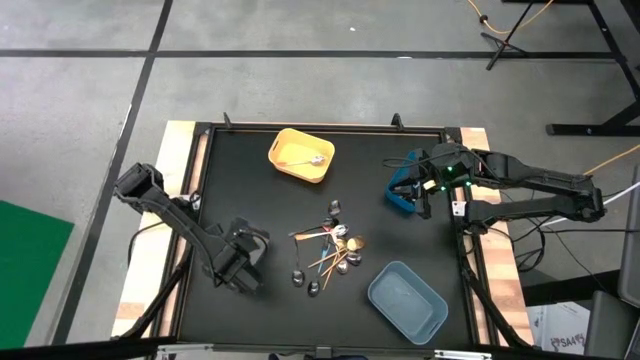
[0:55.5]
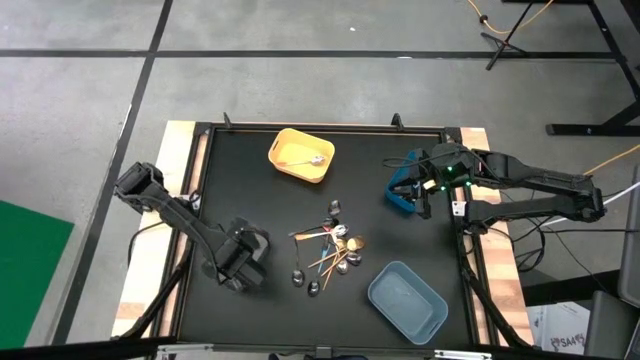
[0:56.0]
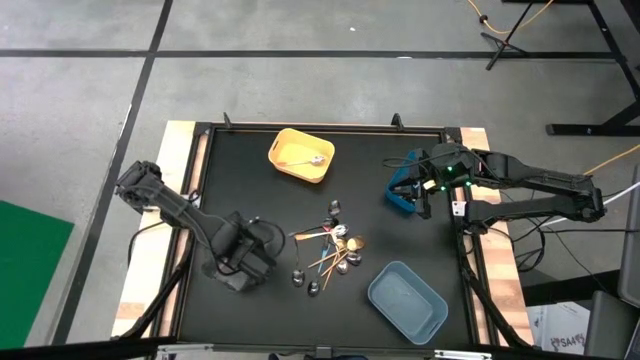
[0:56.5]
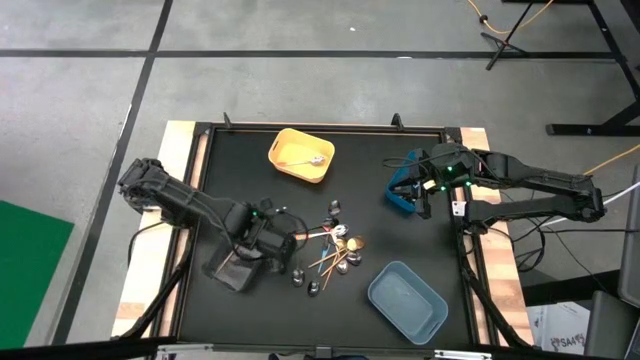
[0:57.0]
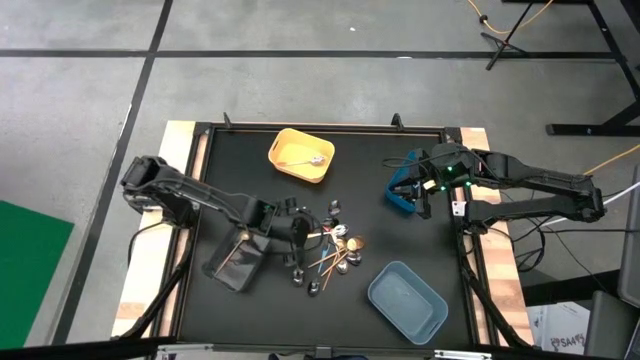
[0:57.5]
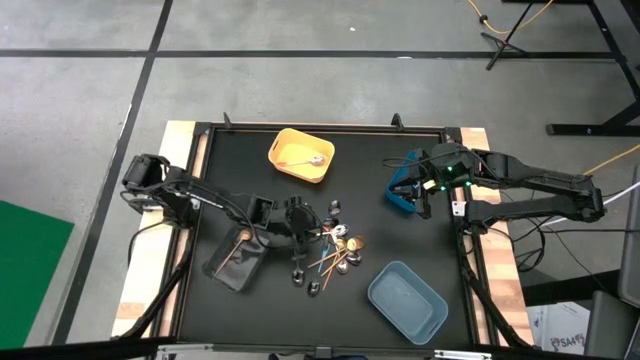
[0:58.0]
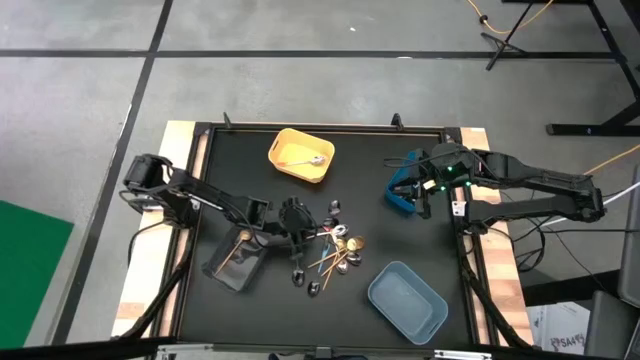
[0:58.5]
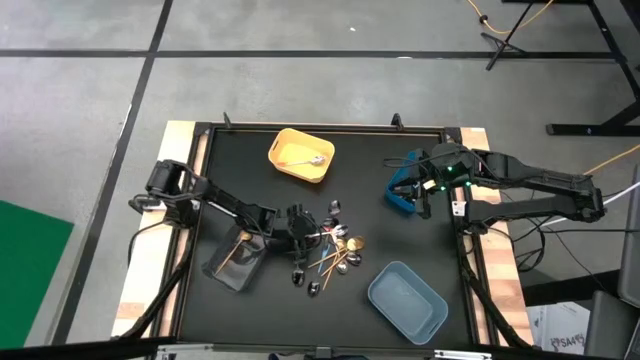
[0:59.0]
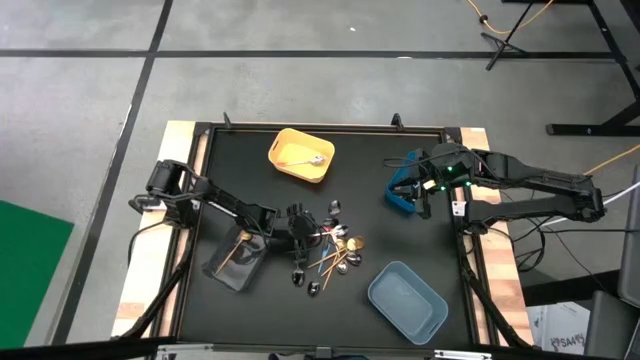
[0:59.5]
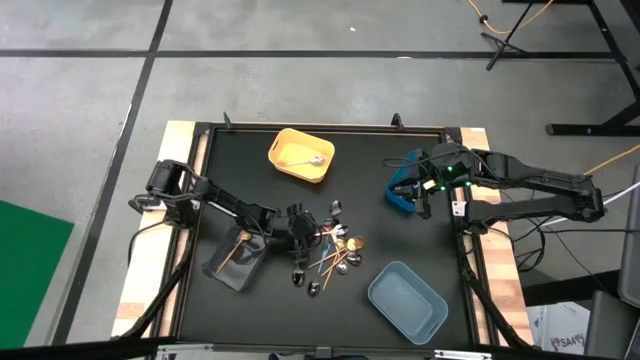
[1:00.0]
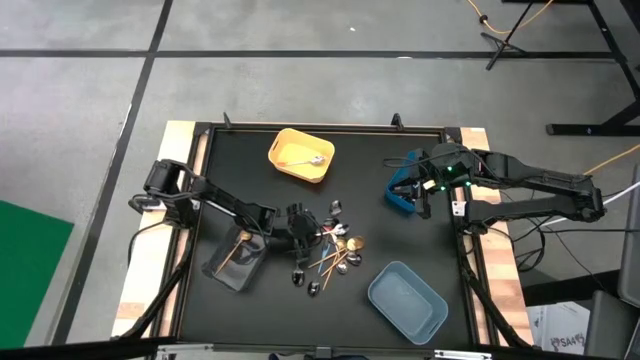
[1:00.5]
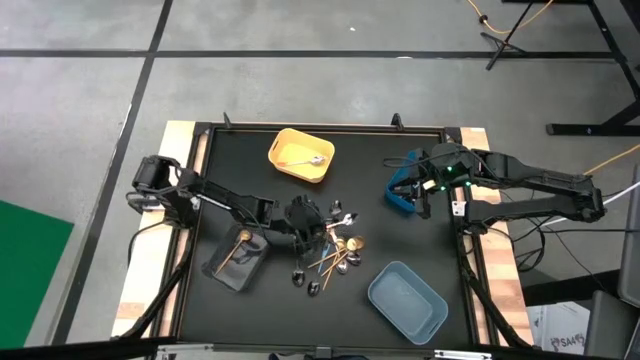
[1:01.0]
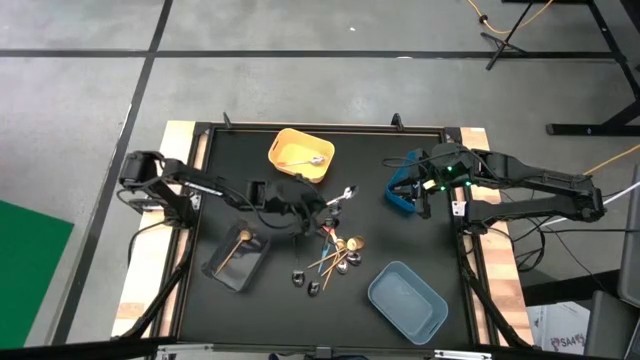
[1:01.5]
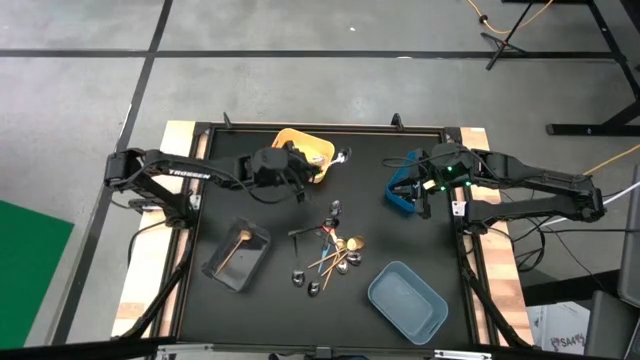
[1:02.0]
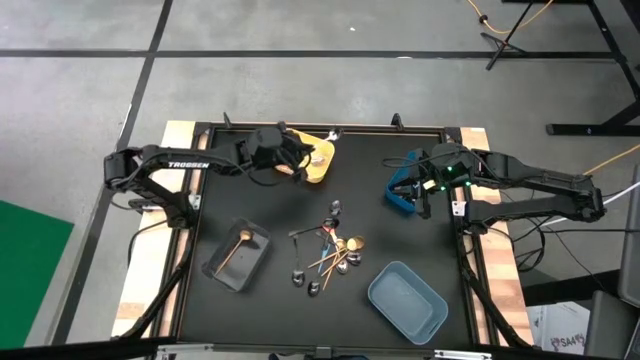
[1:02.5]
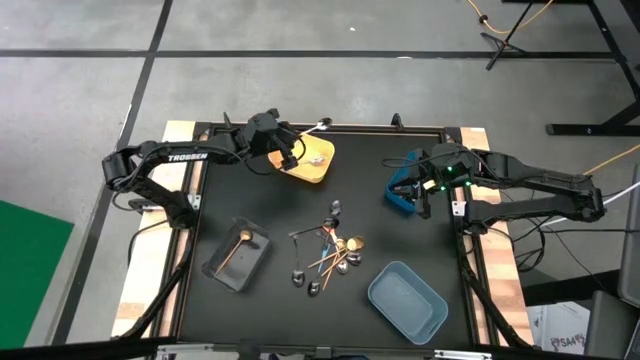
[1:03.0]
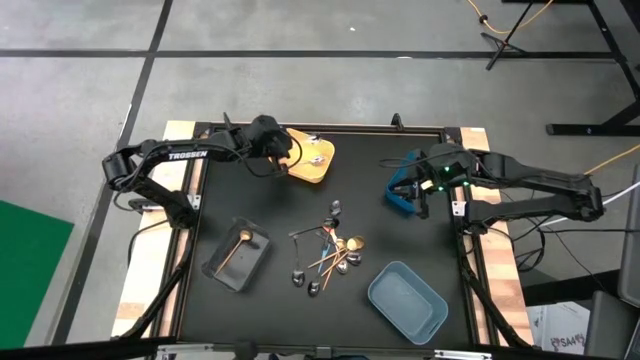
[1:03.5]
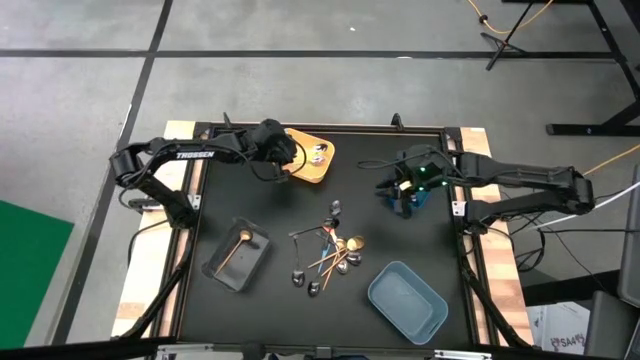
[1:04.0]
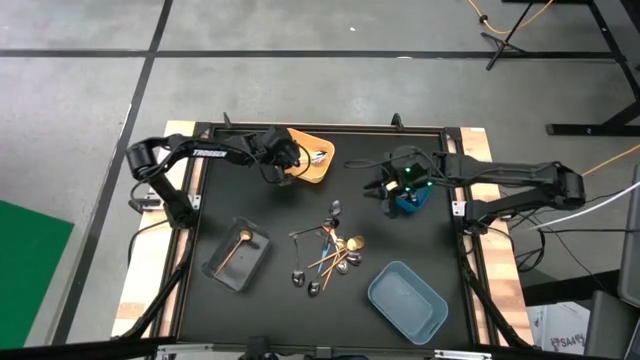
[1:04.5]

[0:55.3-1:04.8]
Task: Sort silverware by color (type)
Put the orange spoon into the yellow bin

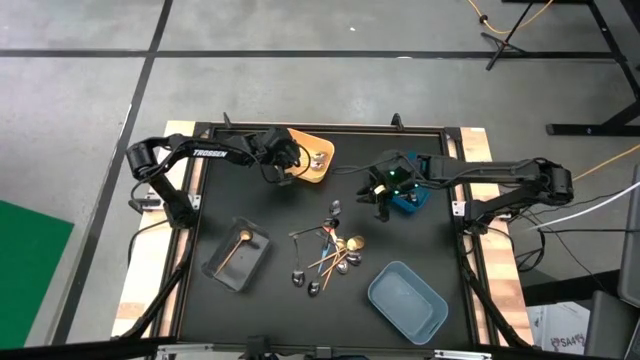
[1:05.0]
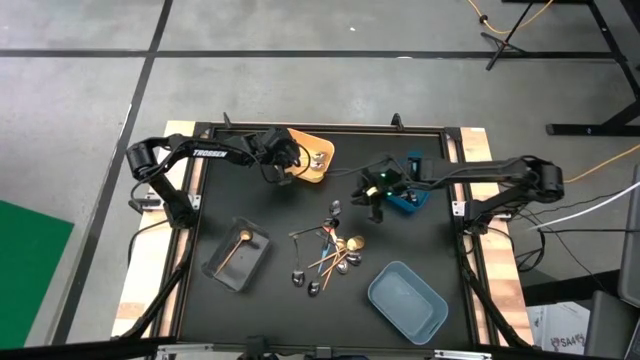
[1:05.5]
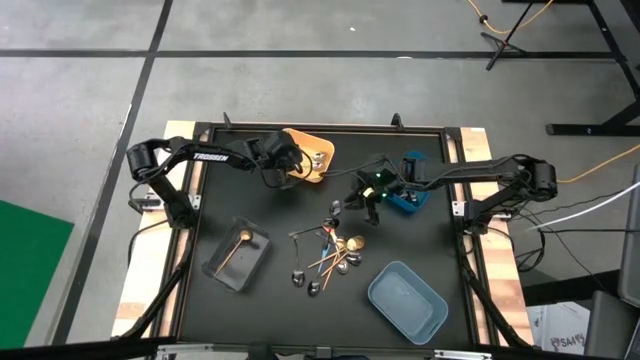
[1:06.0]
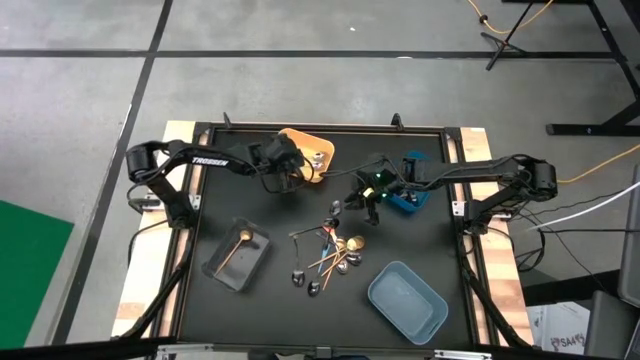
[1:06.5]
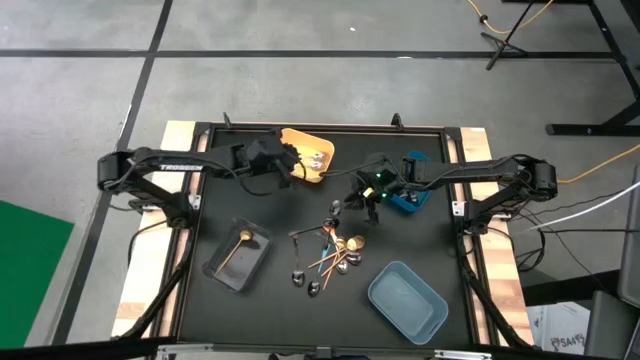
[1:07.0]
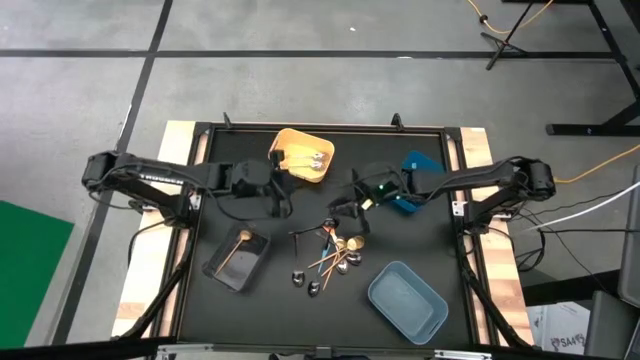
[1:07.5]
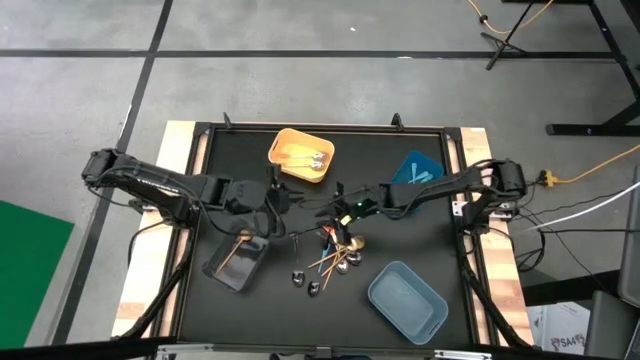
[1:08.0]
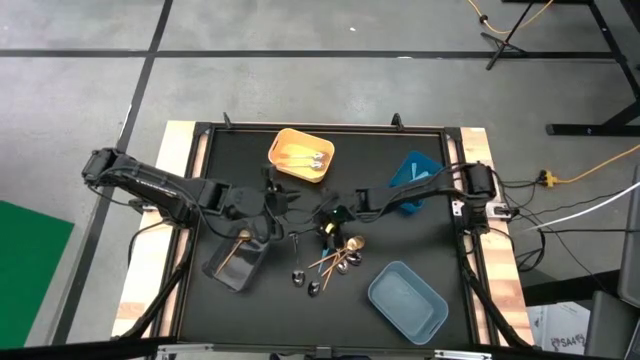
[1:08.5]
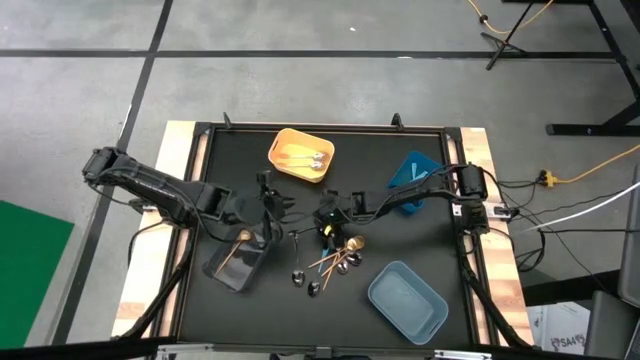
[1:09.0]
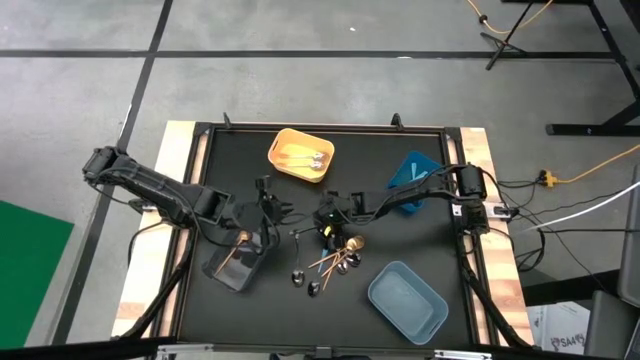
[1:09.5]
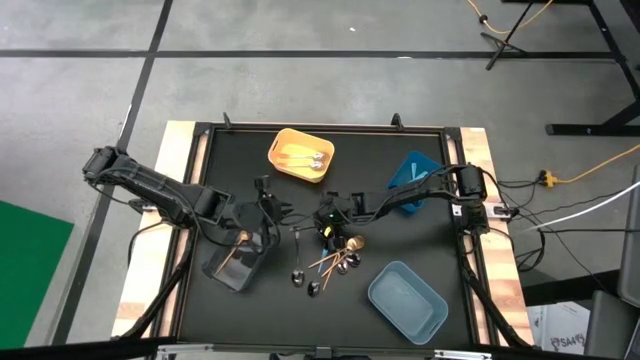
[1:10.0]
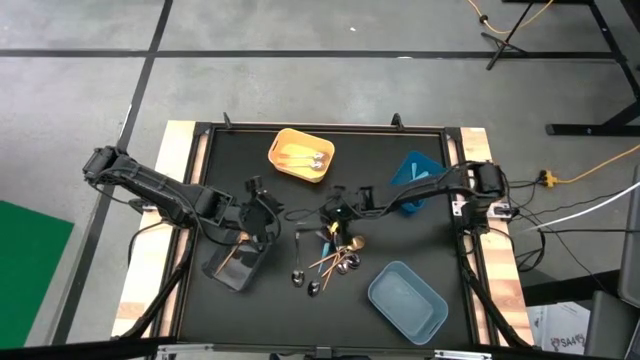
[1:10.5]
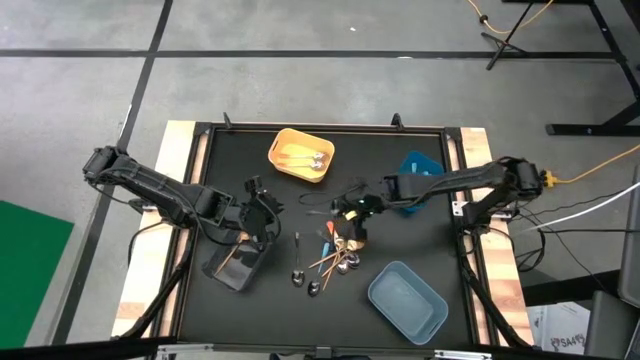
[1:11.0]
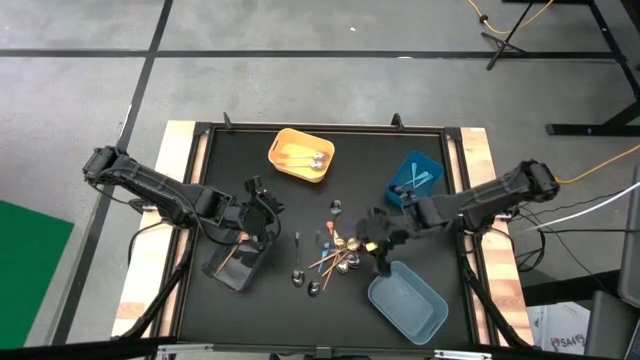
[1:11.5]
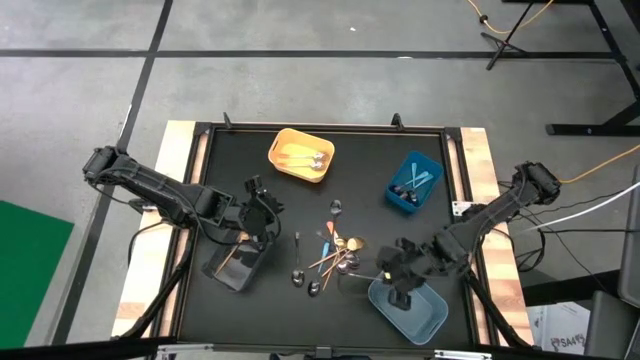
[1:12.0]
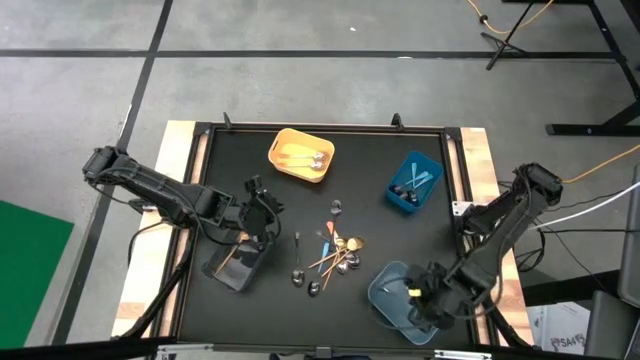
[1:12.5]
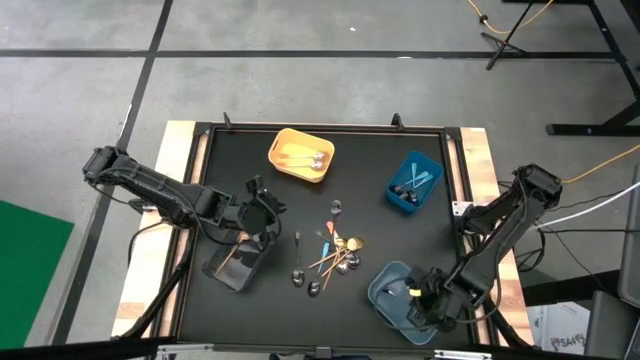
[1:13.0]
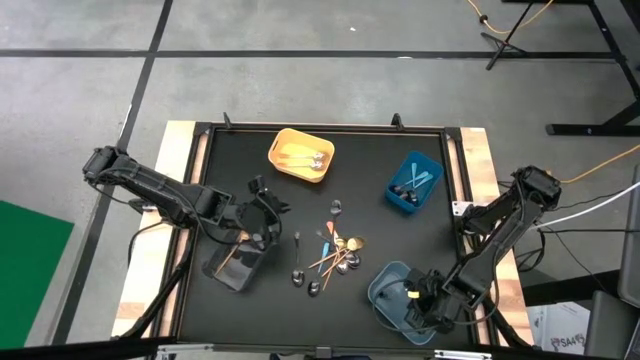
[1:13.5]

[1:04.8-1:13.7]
Put the black spoon into the light blue bin

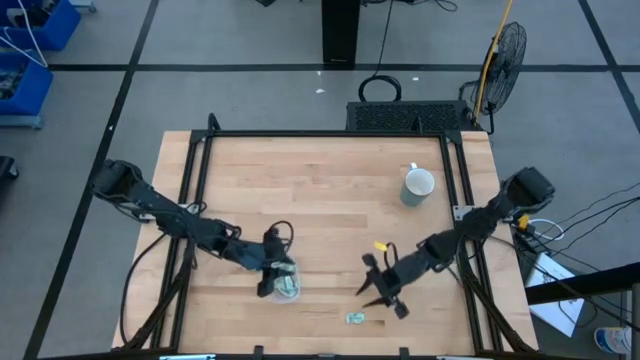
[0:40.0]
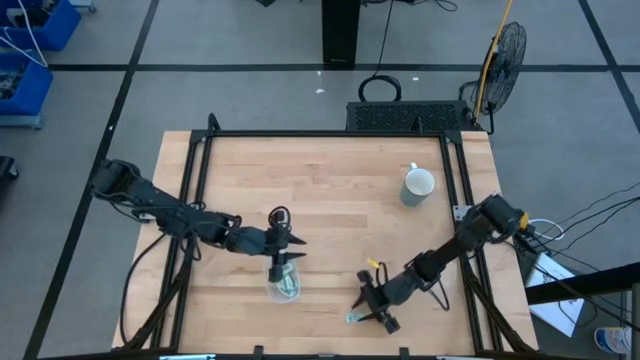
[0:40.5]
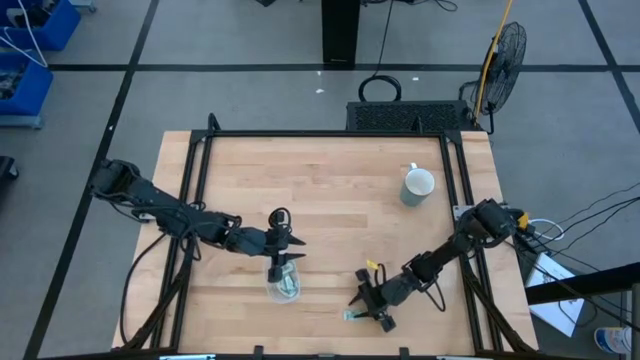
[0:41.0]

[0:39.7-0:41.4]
Task: Pick and place Stevia / Truvia into bins
Put the stevia packet into the transparent container
